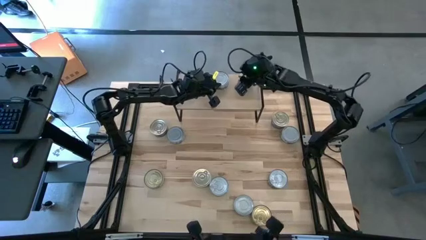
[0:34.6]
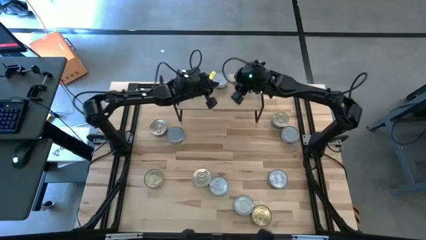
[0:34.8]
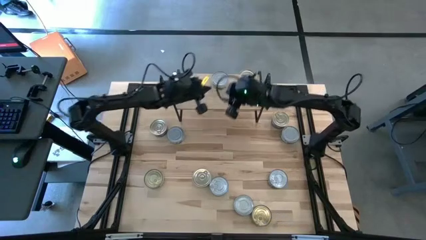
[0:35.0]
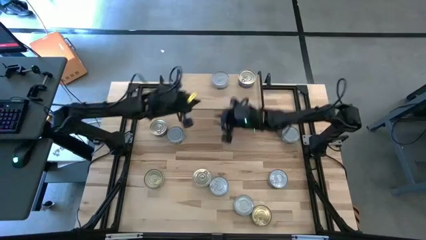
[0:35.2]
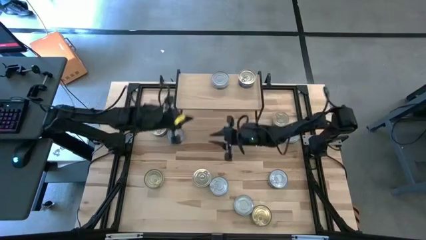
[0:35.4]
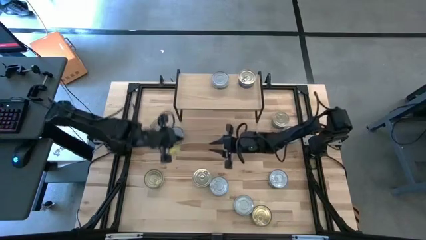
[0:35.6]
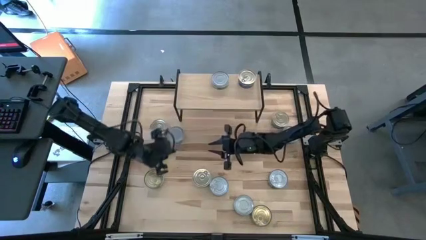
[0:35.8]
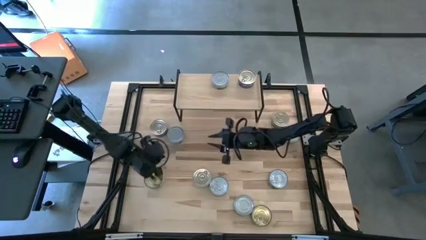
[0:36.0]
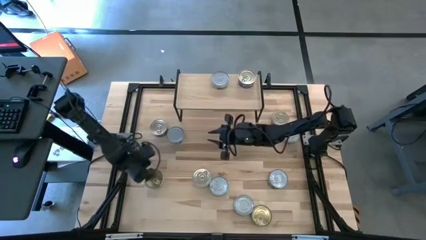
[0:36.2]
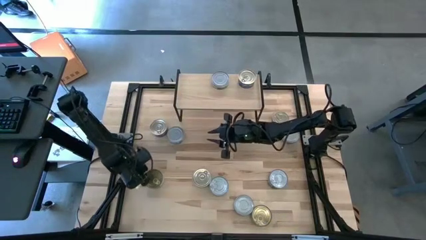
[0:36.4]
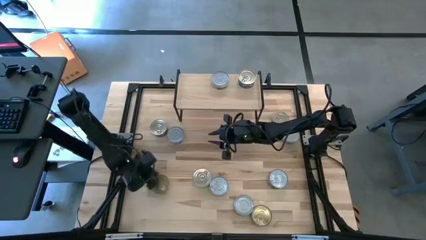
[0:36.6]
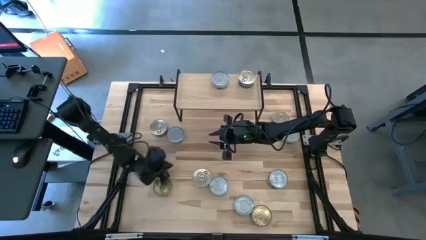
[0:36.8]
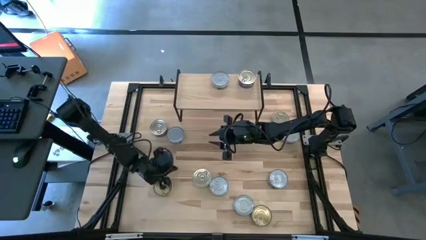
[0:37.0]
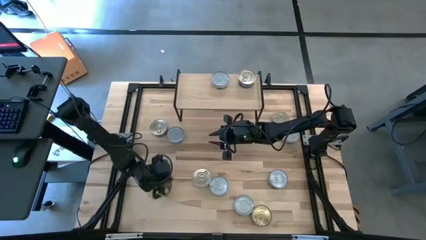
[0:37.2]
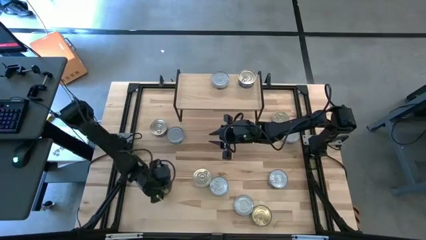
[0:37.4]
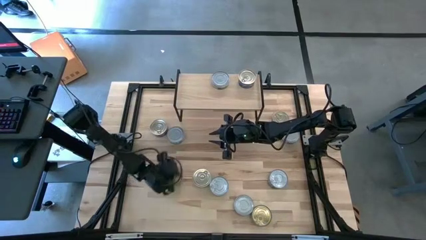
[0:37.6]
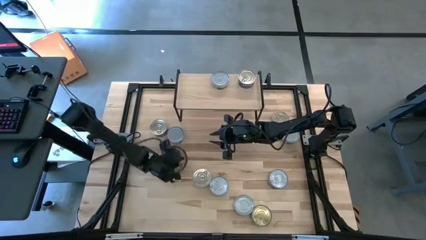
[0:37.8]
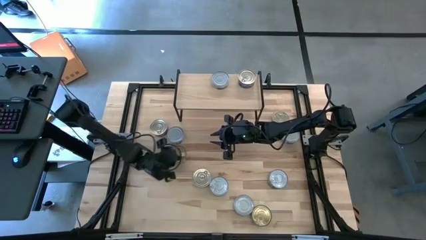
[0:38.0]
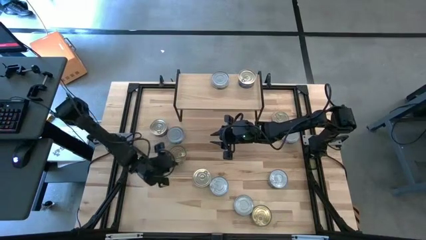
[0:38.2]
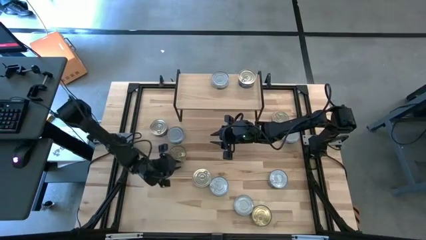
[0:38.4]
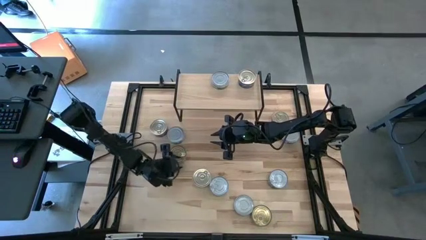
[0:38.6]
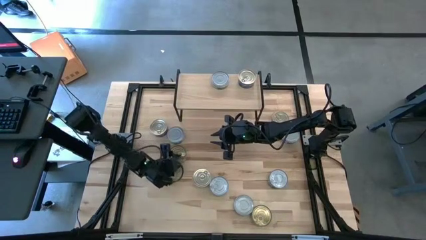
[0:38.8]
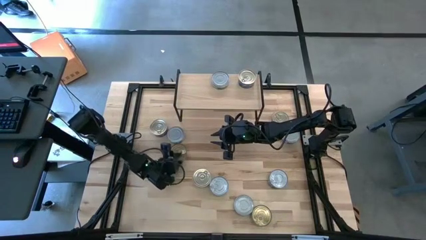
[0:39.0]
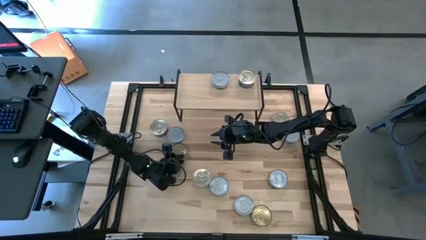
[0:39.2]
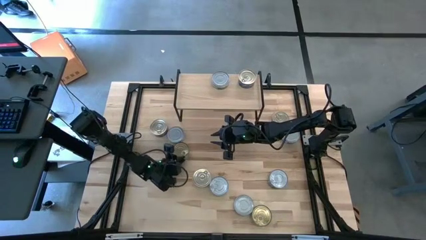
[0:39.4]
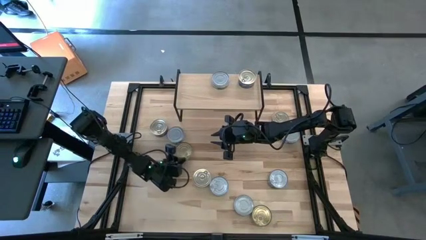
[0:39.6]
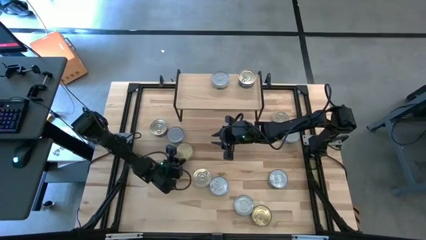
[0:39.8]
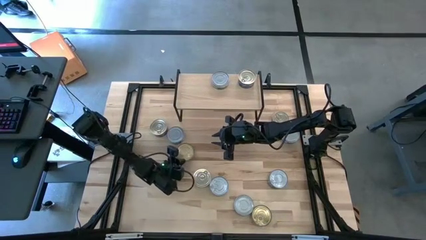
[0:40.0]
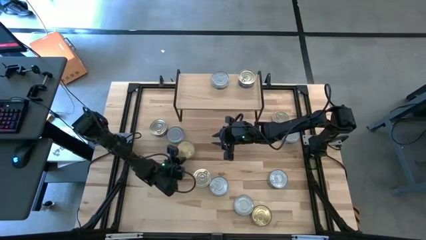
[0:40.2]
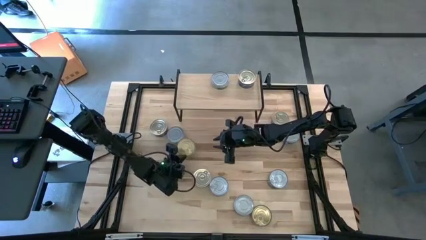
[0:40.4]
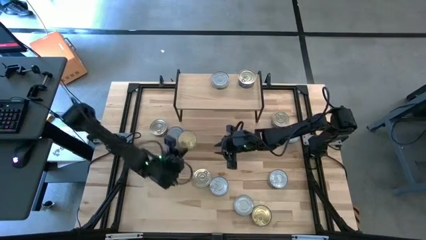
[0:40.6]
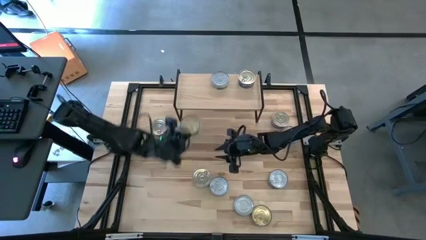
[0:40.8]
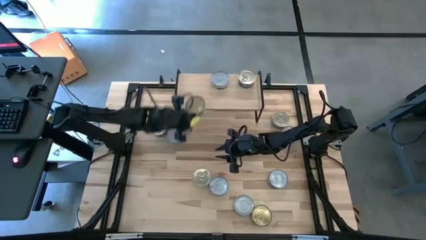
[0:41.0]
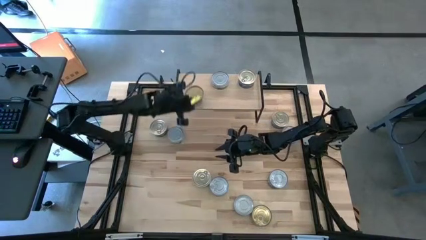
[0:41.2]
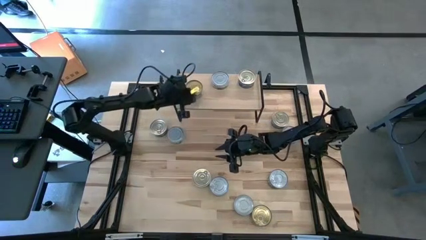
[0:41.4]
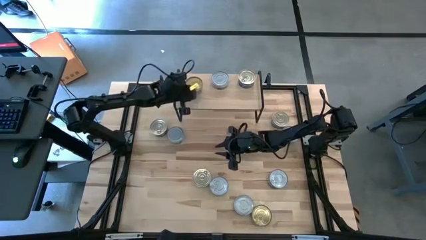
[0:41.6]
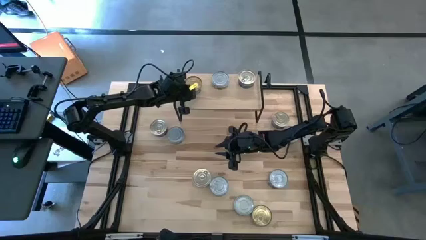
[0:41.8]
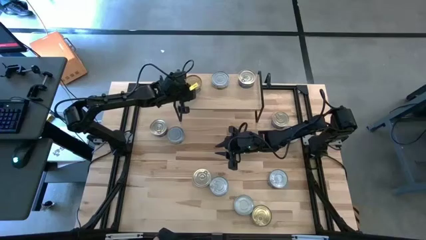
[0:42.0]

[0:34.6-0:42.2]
Task: Stack canned seafood by type on shelf
Put the top left green tuna can on the shelf

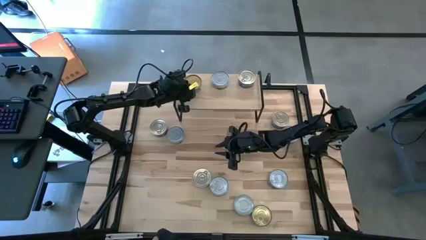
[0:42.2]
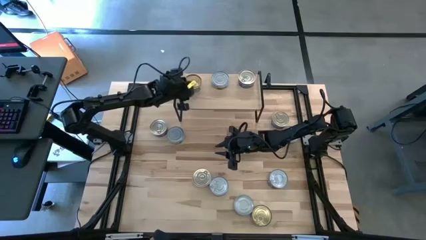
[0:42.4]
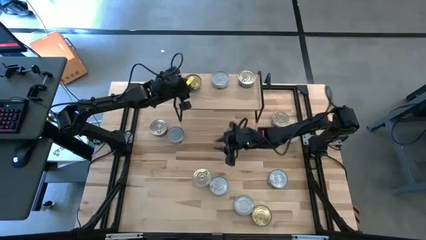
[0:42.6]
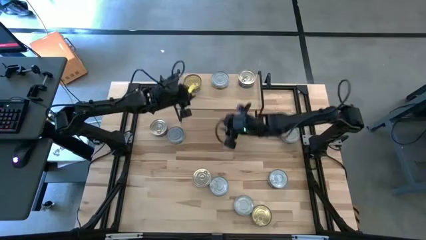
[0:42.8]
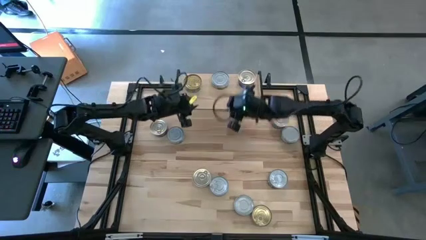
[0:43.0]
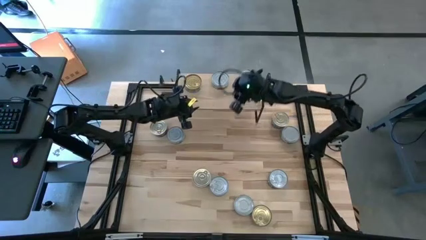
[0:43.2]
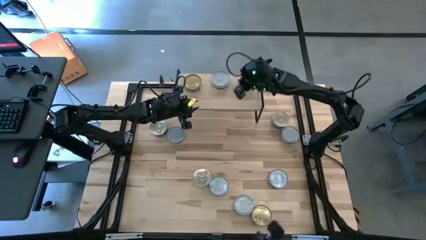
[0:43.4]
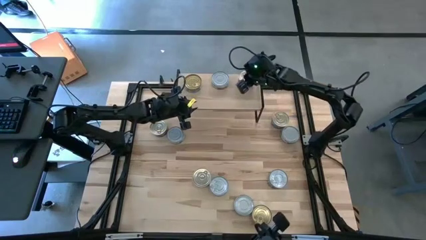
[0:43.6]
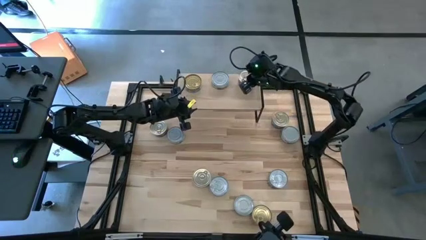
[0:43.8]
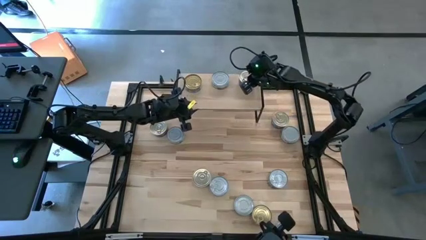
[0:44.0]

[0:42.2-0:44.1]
Adjust the blue tuna can on the shelf

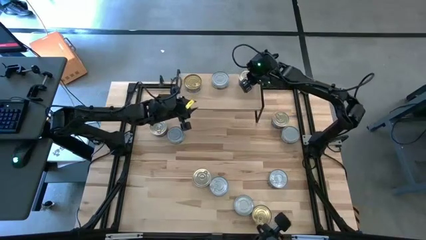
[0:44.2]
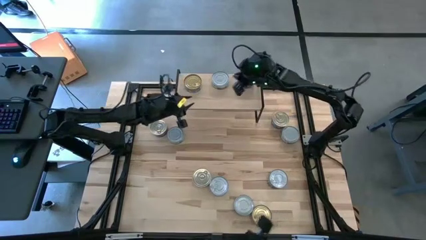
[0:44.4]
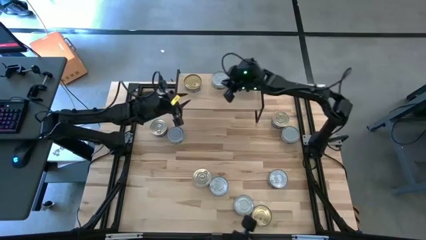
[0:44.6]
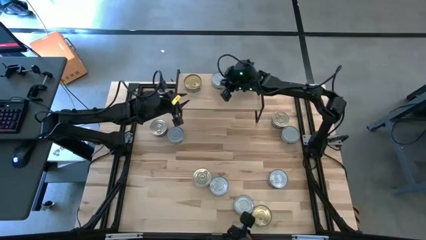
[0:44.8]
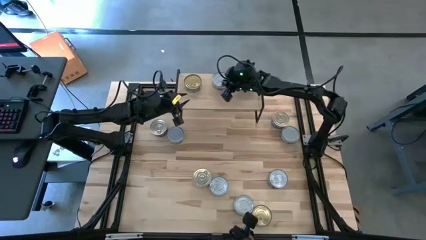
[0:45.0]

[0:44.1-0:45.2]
Adjust the light green tuna can on the shelf
